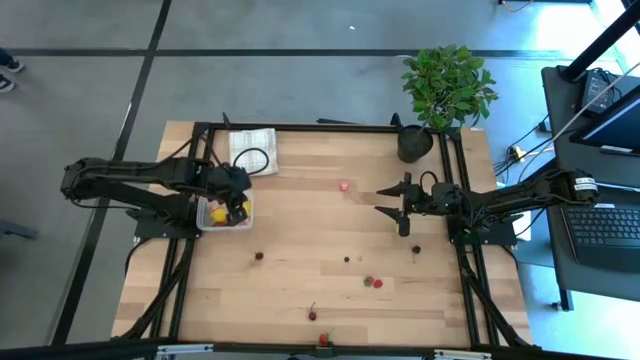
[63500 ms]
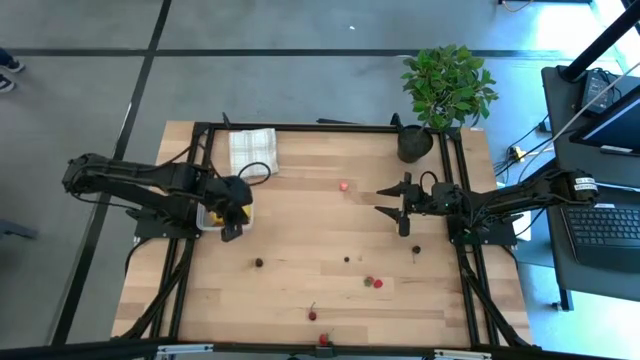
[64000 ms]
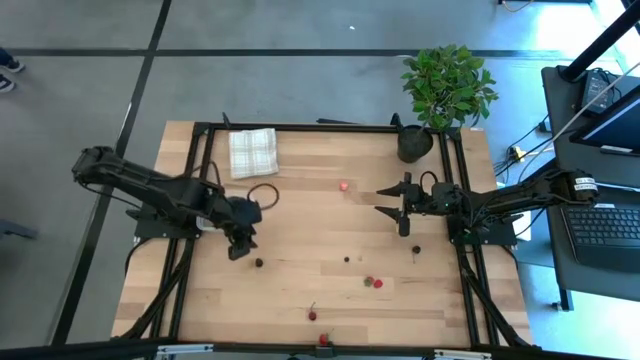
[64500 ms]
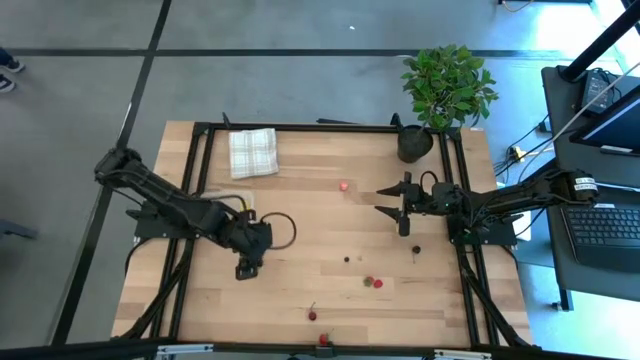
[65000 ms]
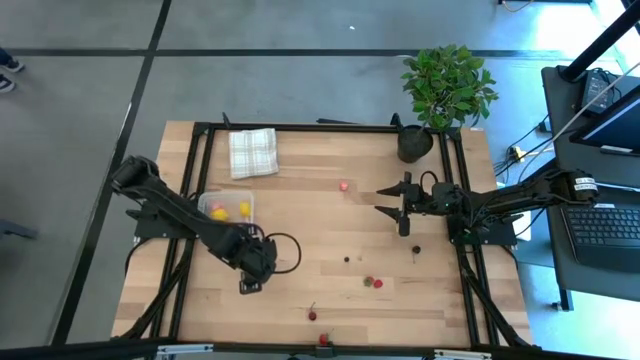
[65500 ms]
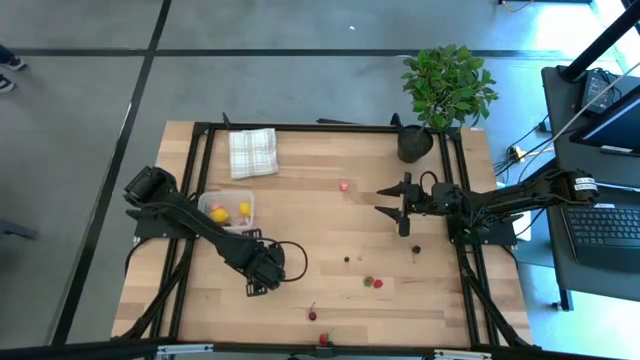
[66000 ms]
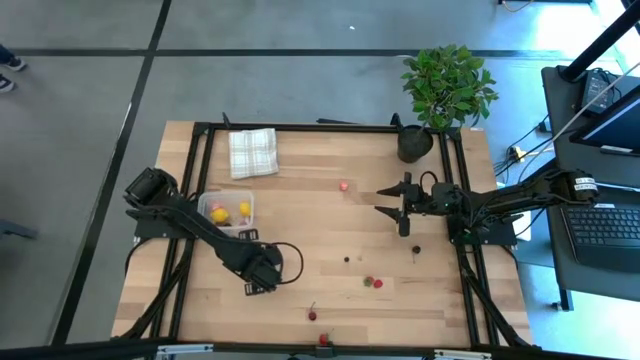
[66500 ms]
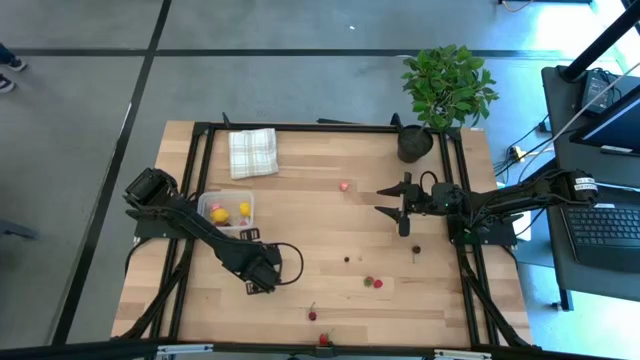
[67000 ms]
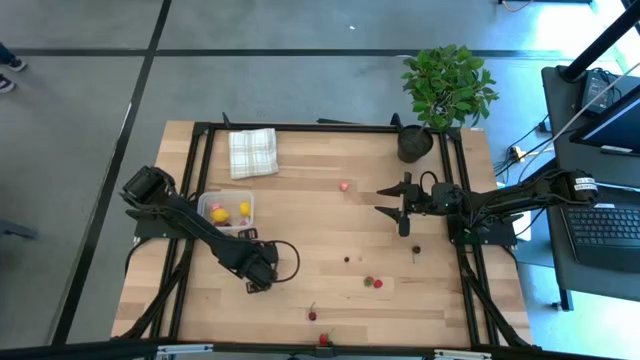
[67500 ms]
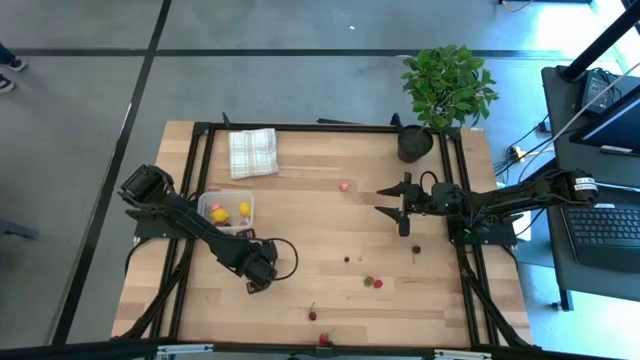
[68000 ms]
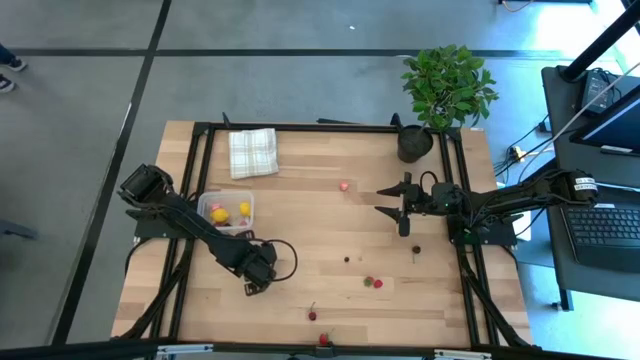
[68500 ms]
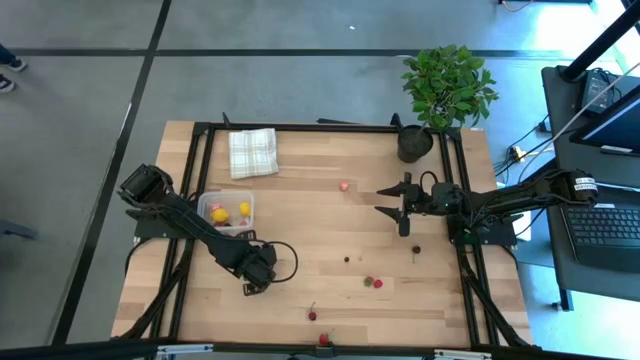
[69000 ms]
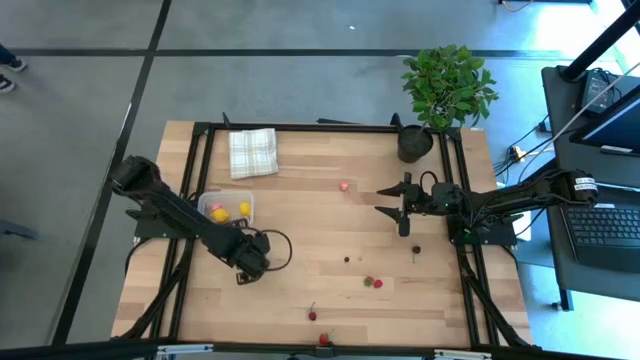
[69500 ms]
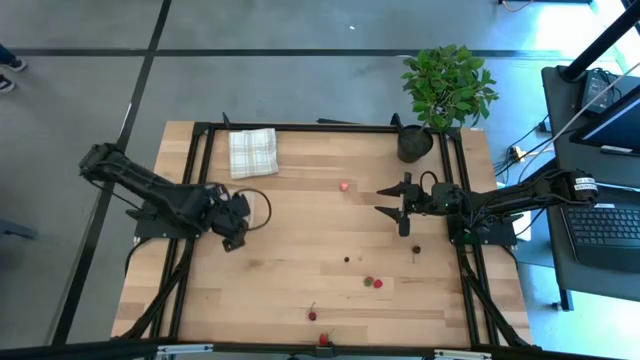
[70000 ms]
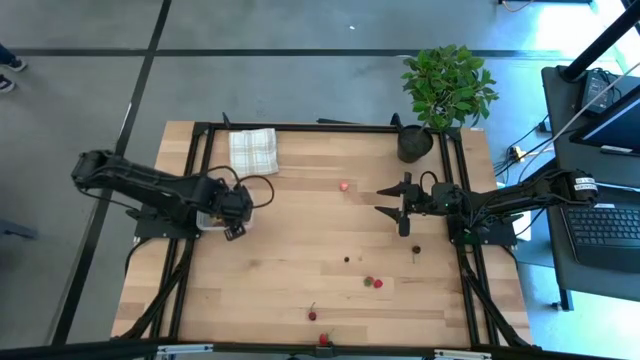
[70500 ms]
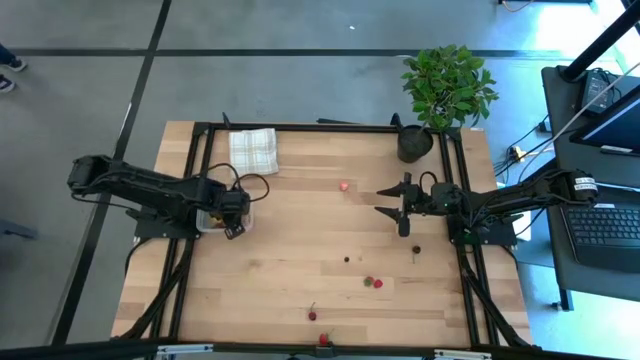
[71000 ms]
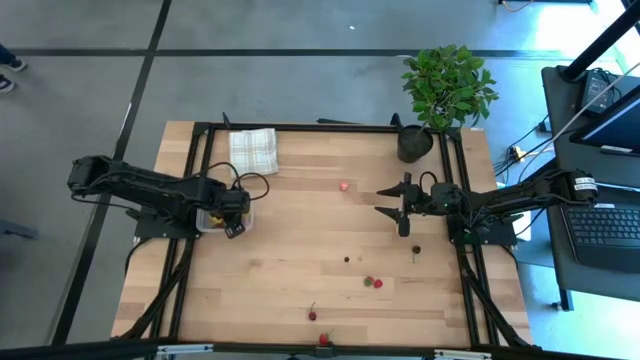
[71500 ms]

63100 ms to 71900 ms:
Task: Pick and placing Produce into tupperware
Put the left black berry into the transparent bin

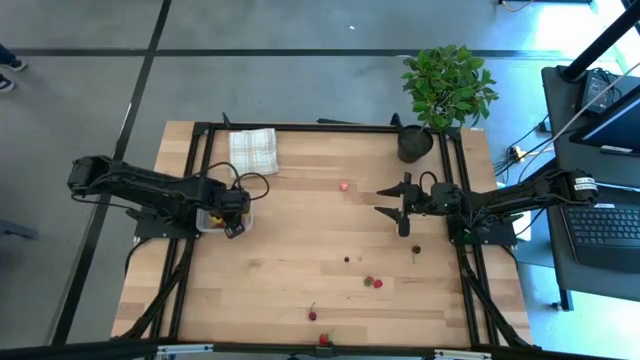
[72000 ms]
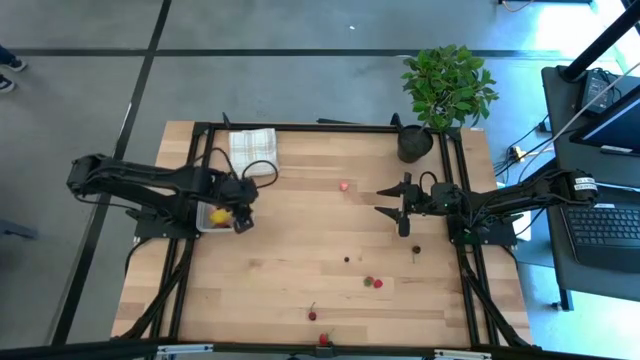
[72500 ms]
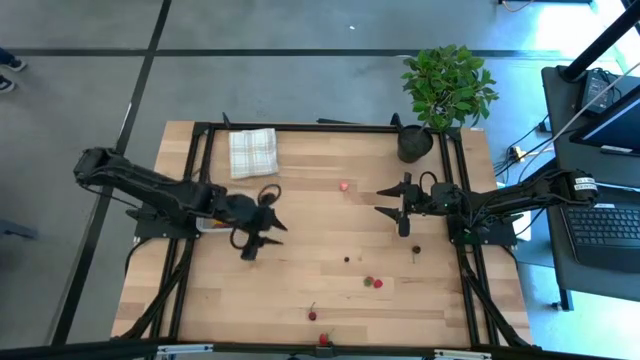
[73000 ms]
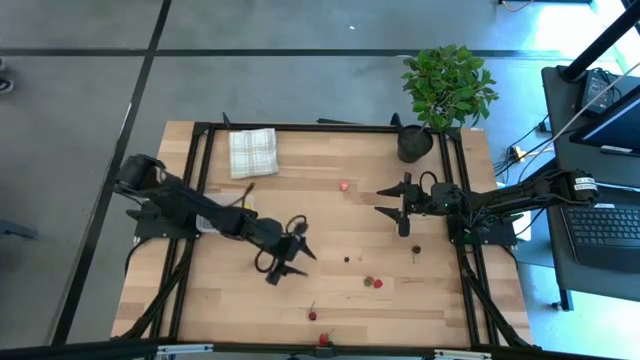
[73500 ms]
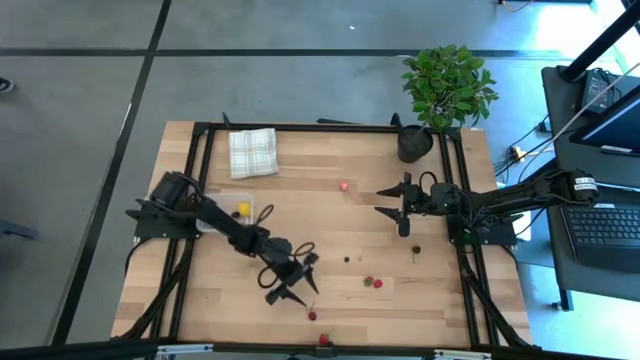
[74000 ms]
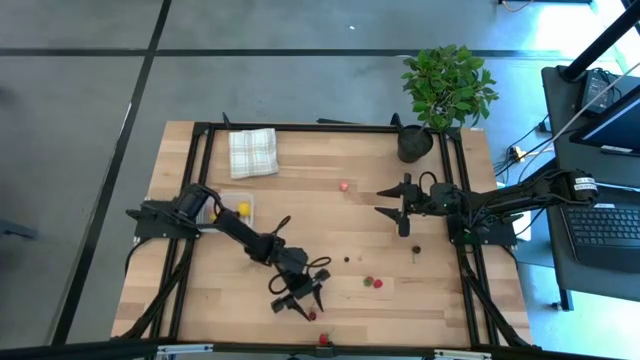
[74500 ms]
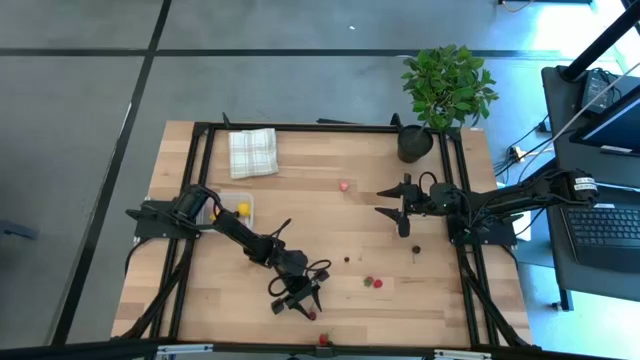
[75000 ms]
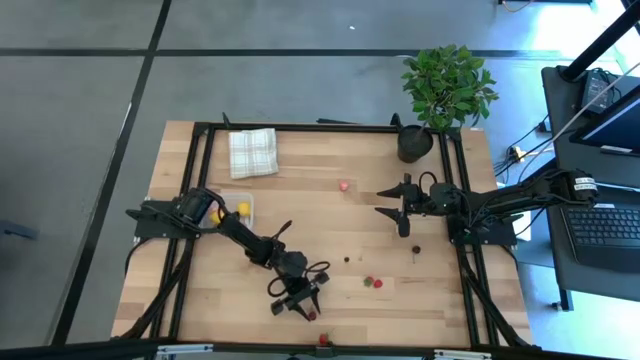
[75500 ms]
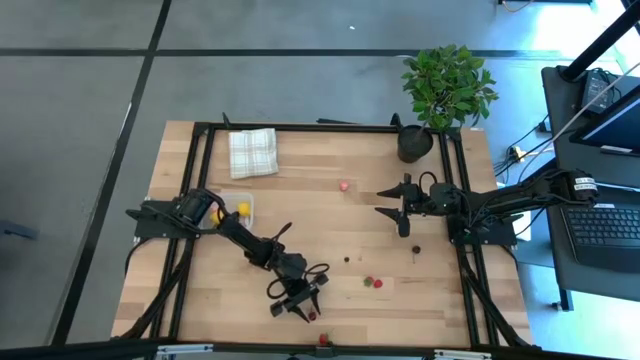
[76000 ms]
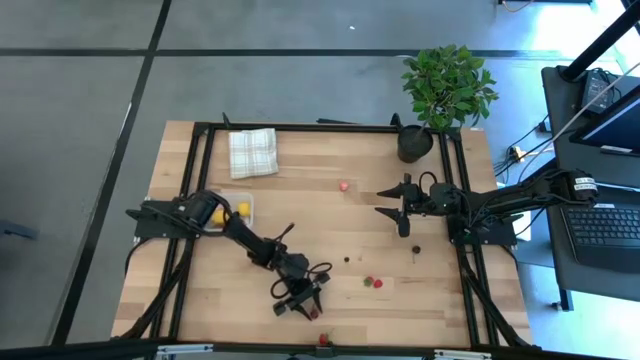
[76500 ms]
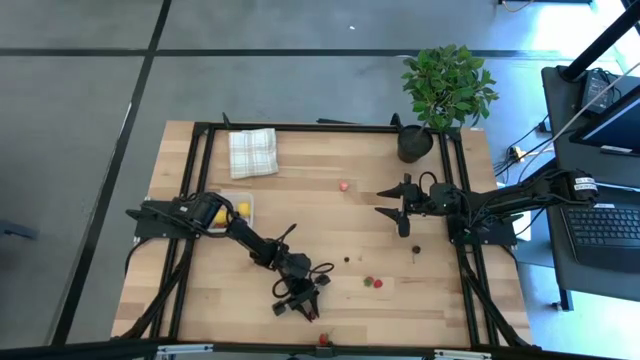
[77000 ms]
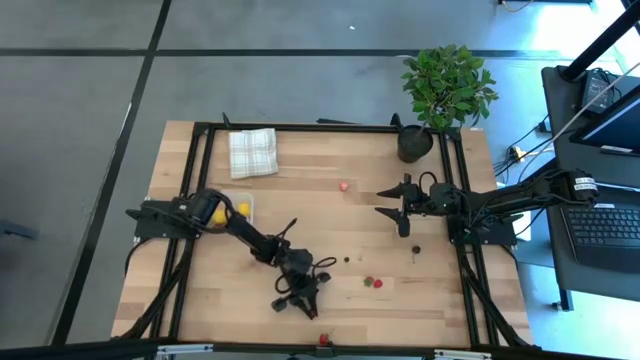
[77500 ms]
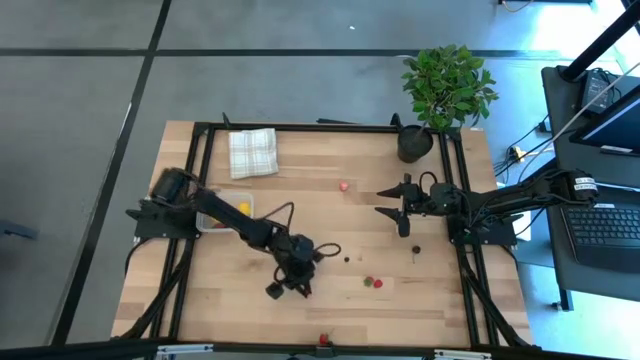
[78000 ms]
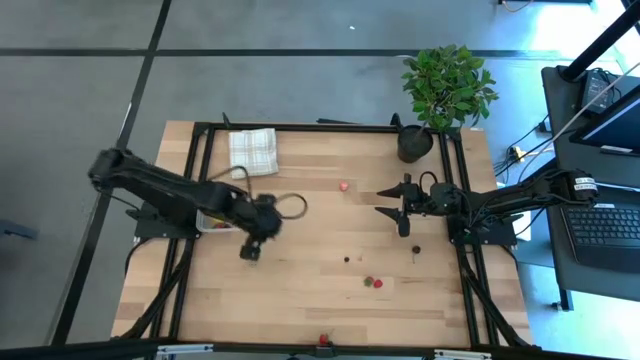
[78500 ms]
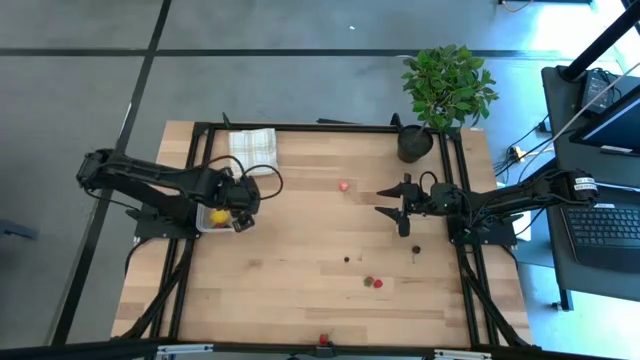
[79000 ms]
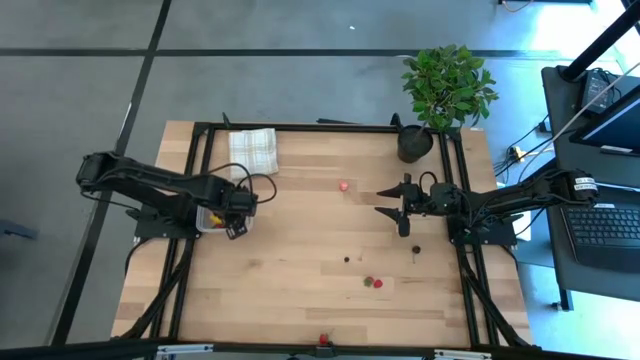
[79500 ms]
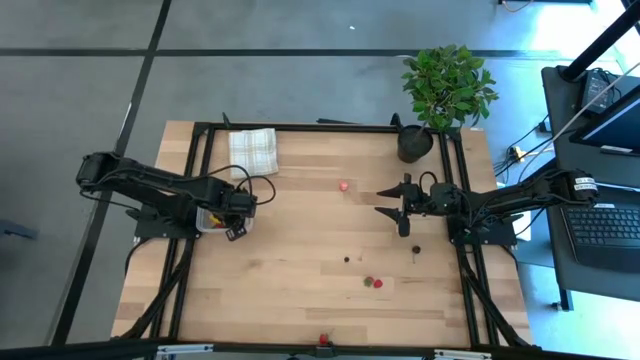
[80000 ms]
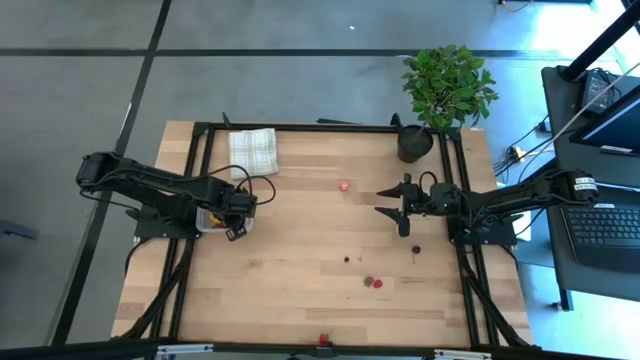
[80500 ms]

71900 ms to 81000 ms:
Put the left red cherry into the transparent bin

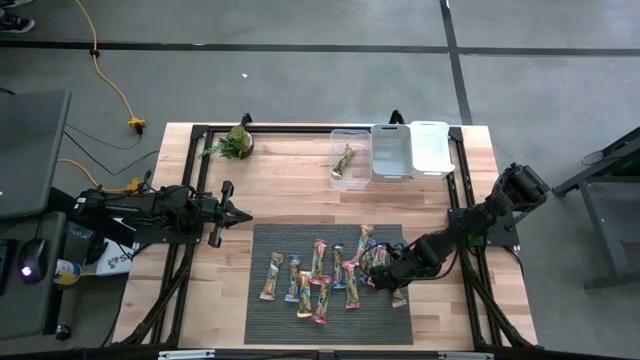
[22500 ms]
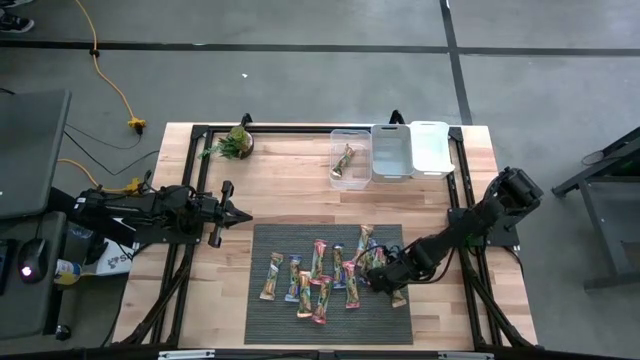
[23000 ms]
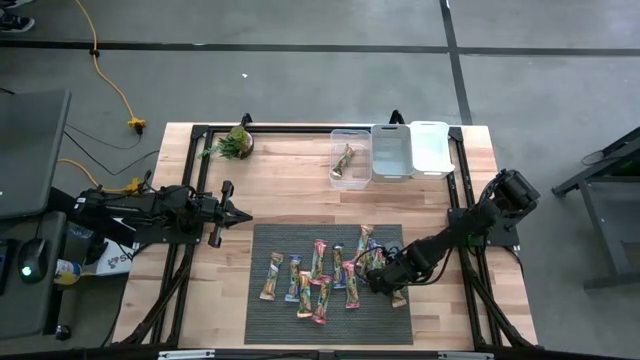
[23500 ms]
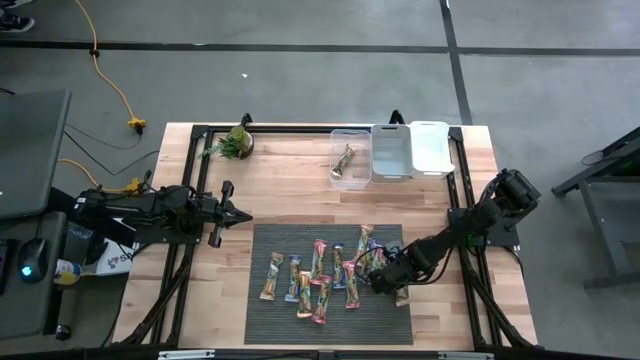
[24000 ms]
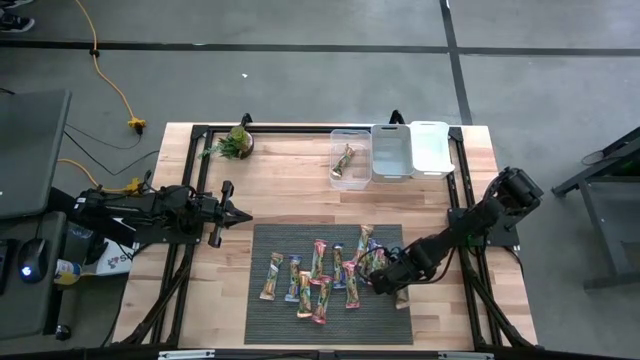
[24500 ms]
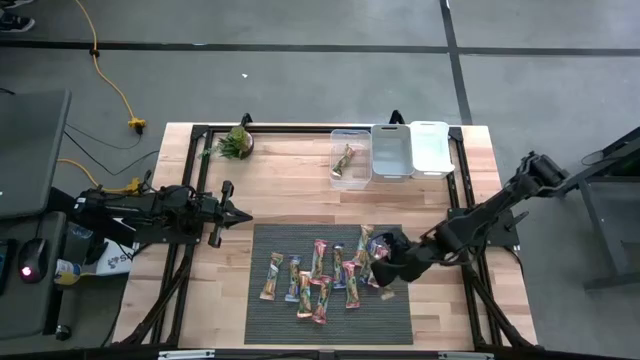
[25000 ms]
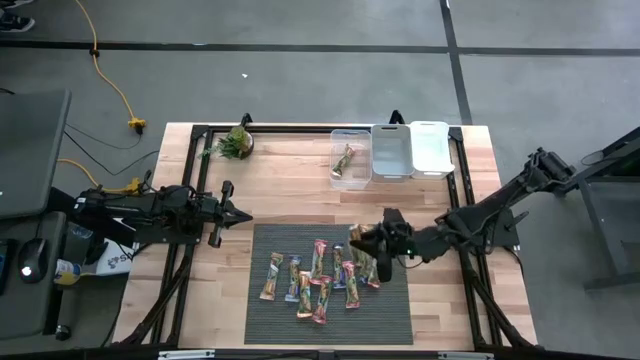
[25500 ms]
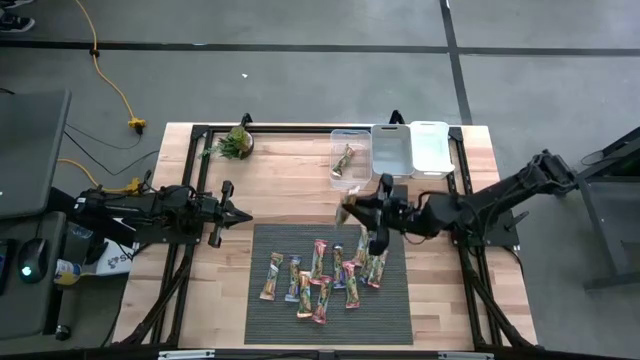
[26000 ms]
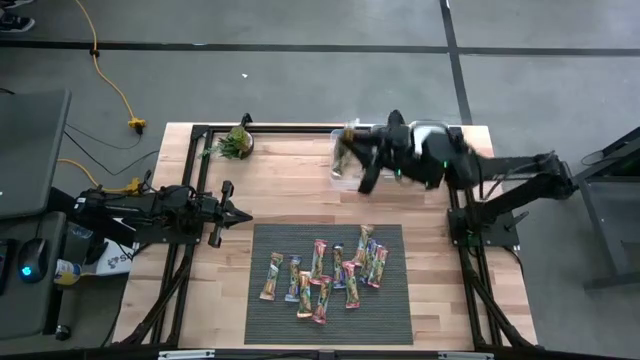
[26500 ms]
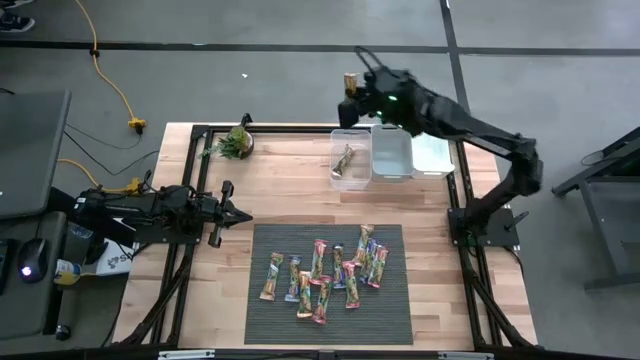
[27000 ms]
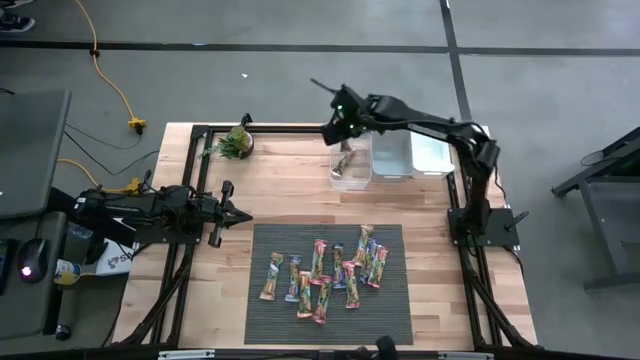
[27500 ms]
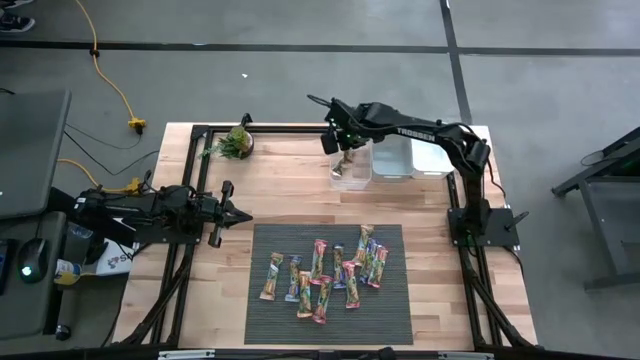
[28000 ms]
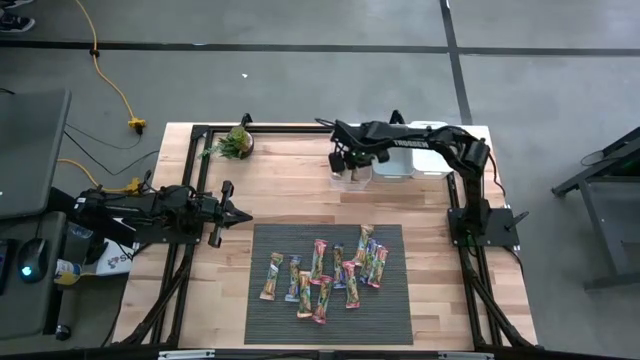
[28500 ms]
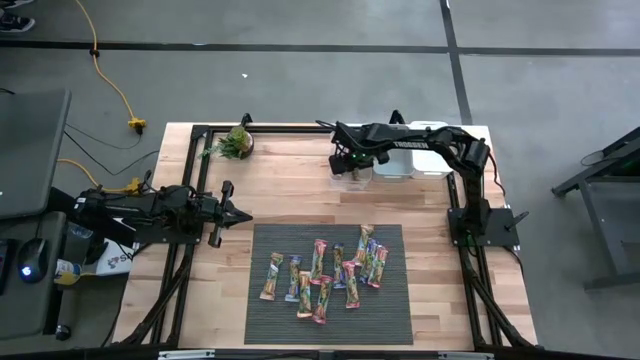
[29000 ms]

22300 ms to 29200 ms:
Task: Pick and place Granola Bars by type
Put the yellow granola bar into the transparent bin
